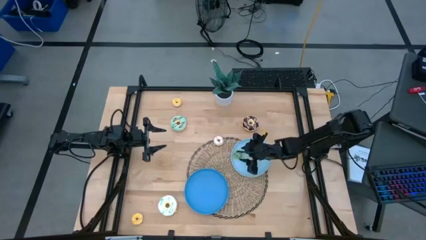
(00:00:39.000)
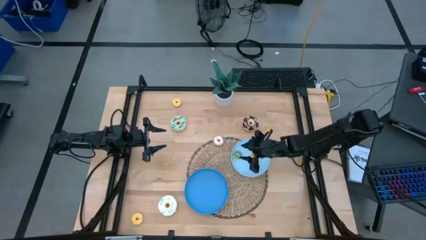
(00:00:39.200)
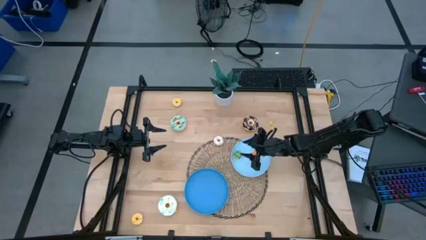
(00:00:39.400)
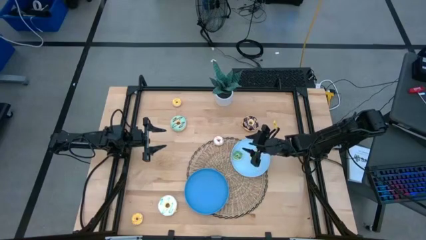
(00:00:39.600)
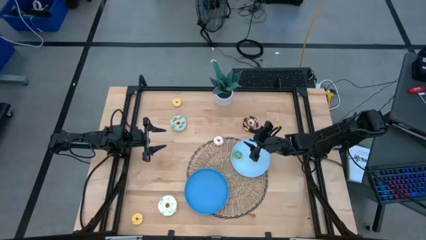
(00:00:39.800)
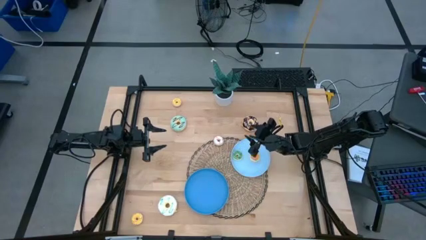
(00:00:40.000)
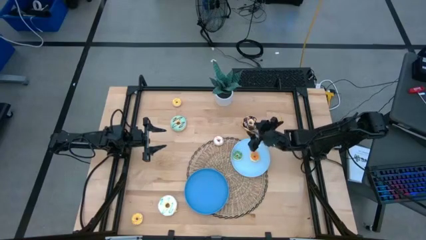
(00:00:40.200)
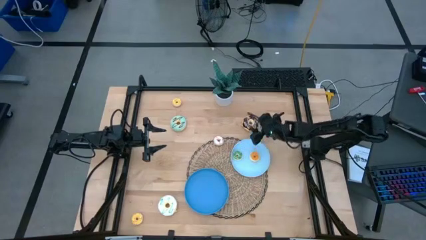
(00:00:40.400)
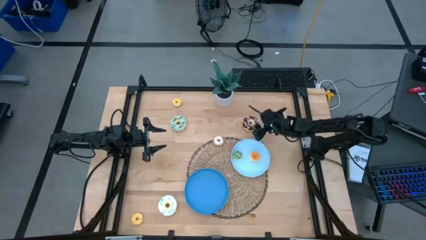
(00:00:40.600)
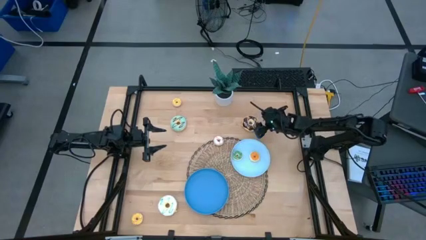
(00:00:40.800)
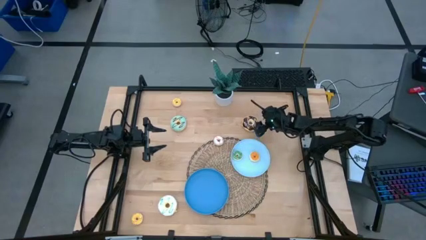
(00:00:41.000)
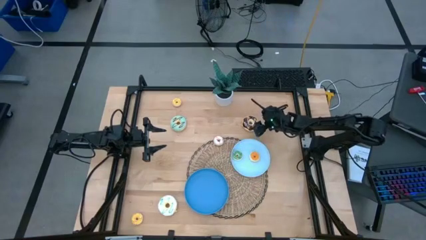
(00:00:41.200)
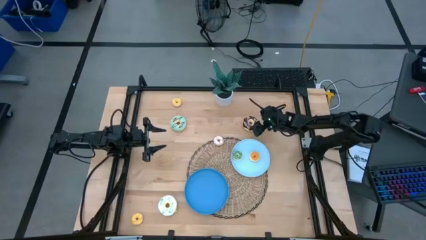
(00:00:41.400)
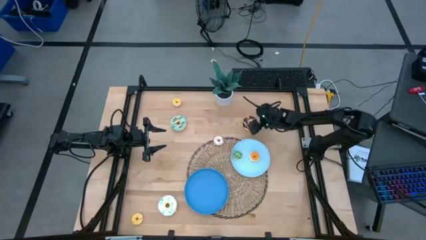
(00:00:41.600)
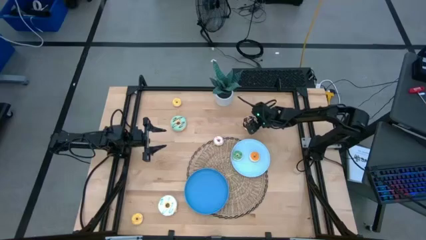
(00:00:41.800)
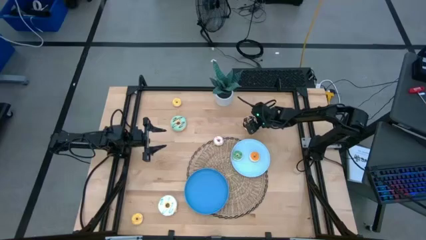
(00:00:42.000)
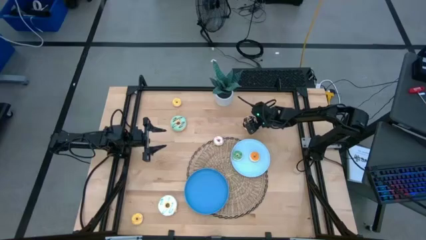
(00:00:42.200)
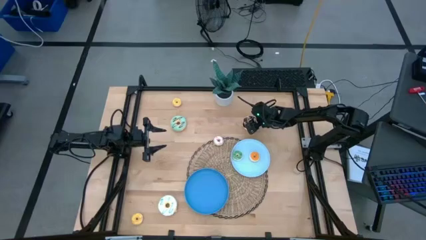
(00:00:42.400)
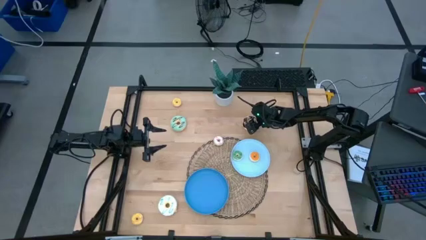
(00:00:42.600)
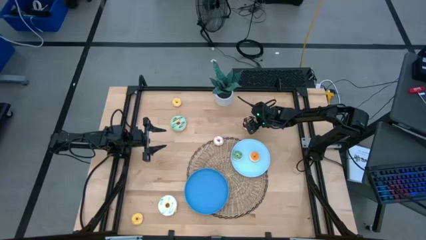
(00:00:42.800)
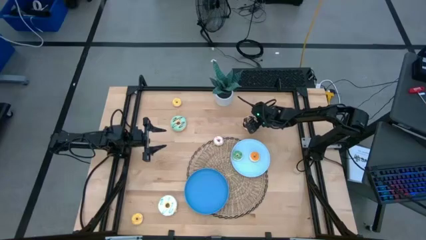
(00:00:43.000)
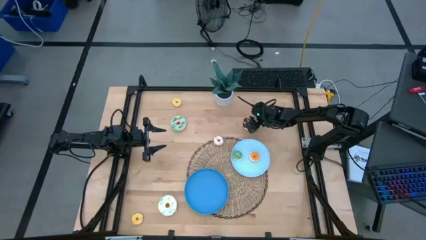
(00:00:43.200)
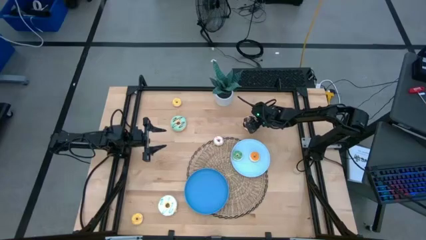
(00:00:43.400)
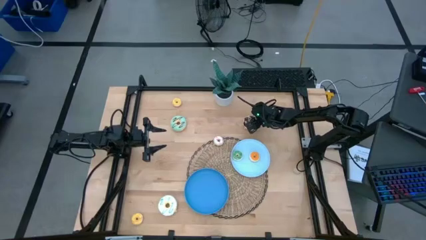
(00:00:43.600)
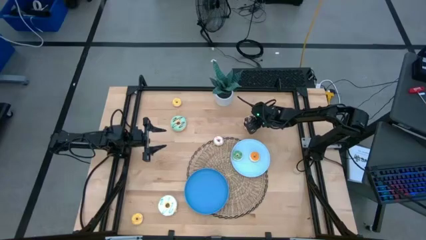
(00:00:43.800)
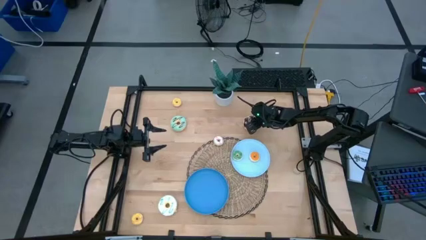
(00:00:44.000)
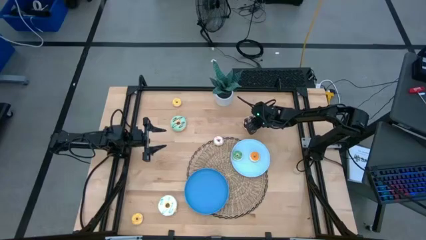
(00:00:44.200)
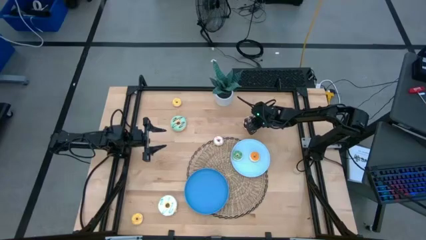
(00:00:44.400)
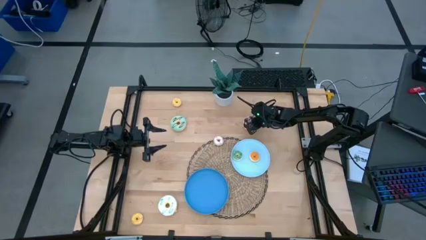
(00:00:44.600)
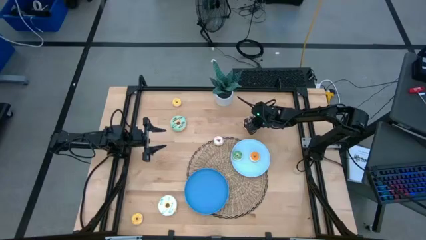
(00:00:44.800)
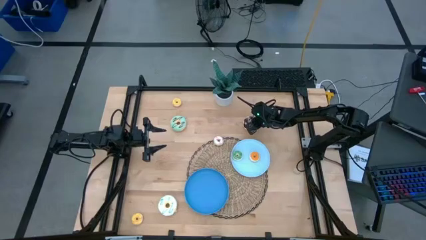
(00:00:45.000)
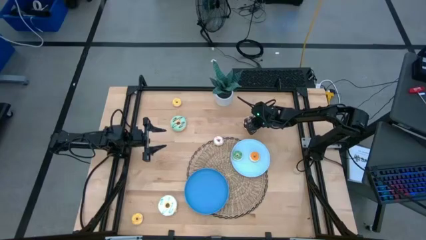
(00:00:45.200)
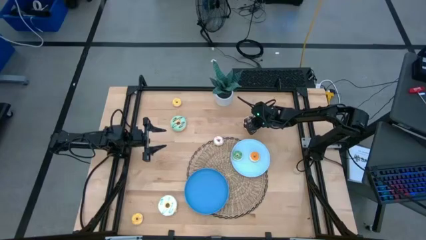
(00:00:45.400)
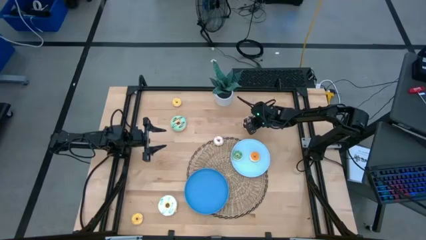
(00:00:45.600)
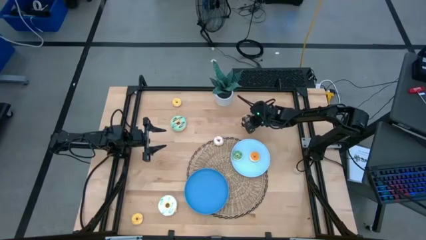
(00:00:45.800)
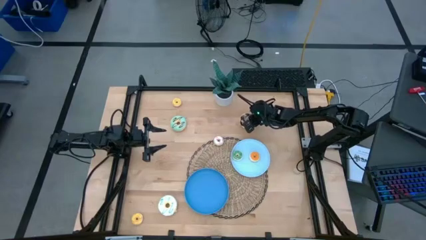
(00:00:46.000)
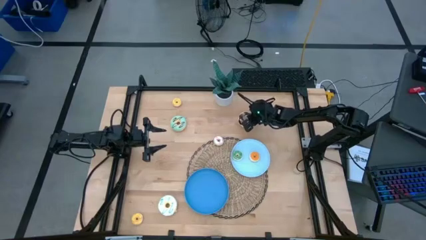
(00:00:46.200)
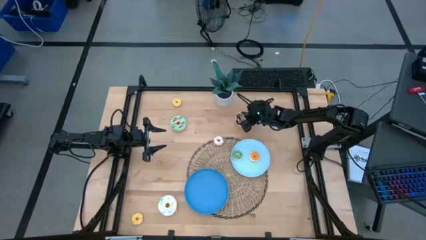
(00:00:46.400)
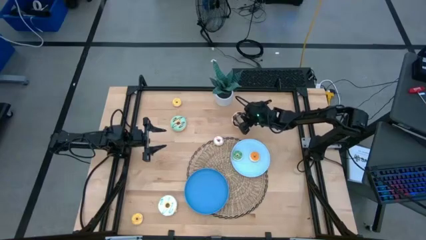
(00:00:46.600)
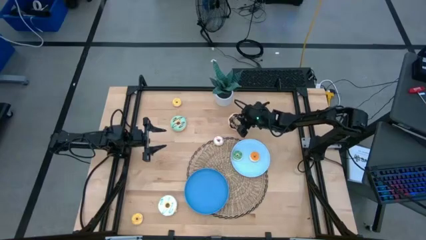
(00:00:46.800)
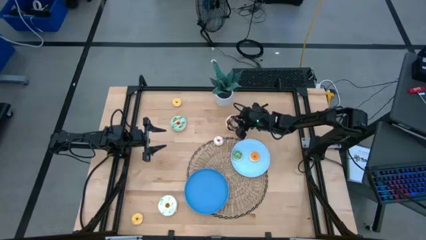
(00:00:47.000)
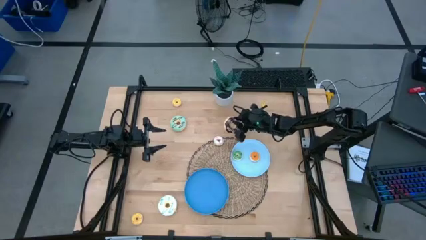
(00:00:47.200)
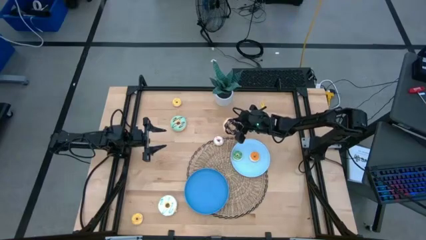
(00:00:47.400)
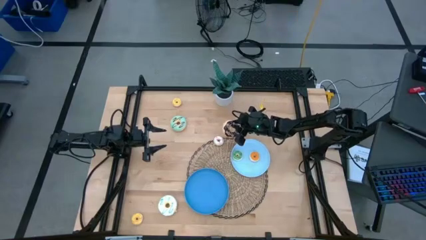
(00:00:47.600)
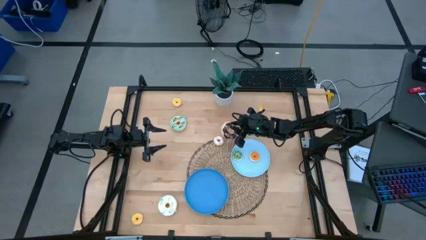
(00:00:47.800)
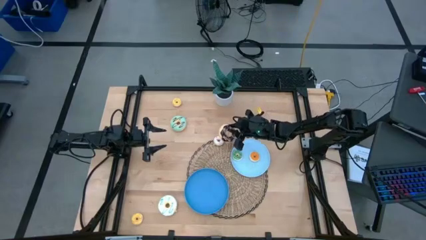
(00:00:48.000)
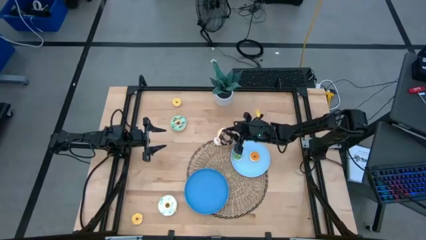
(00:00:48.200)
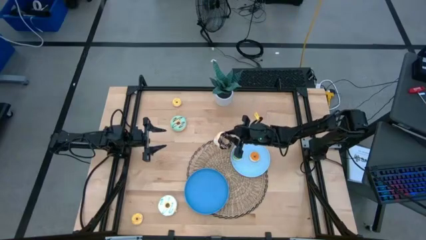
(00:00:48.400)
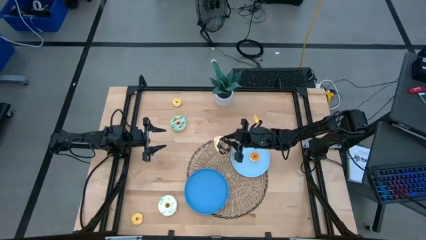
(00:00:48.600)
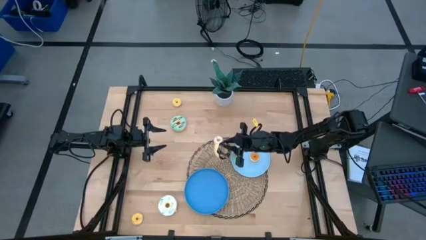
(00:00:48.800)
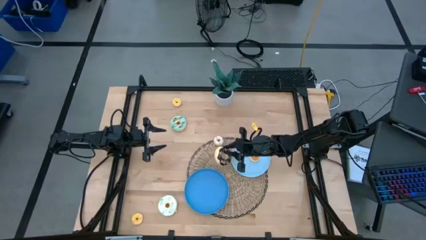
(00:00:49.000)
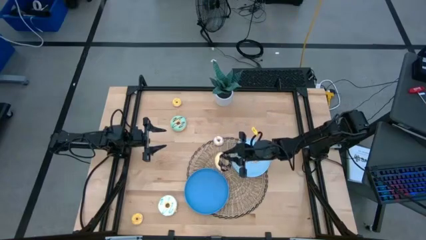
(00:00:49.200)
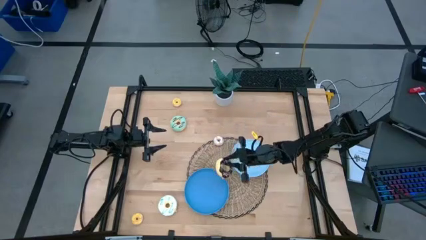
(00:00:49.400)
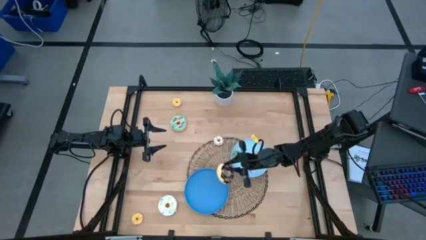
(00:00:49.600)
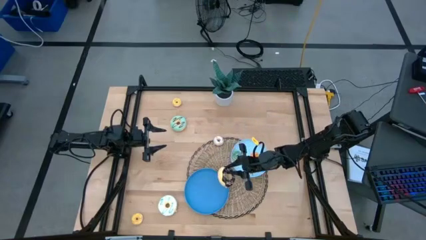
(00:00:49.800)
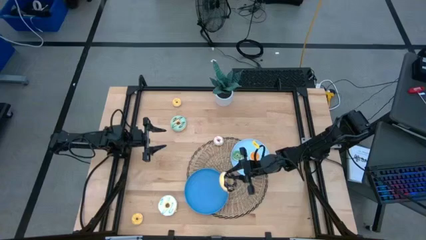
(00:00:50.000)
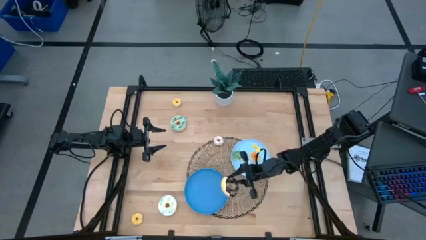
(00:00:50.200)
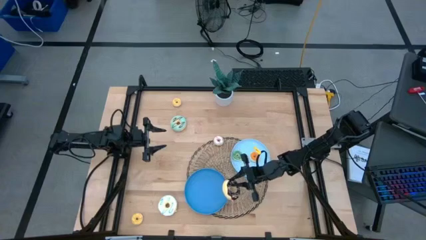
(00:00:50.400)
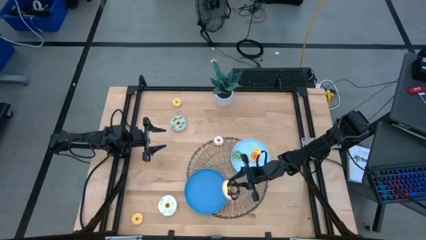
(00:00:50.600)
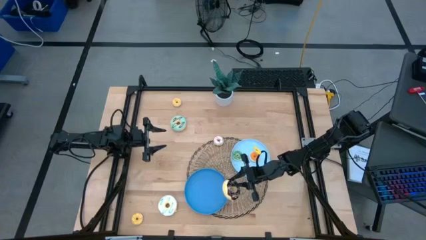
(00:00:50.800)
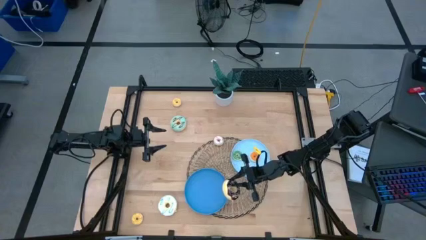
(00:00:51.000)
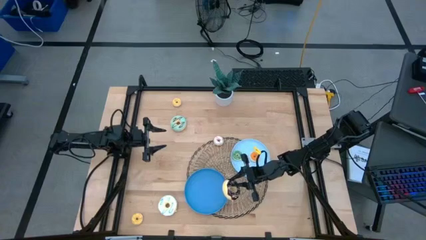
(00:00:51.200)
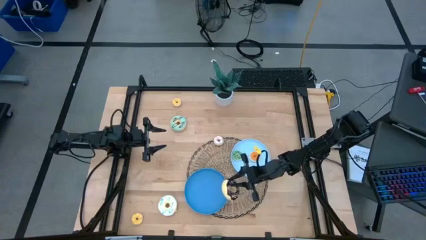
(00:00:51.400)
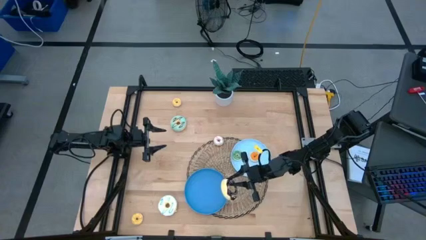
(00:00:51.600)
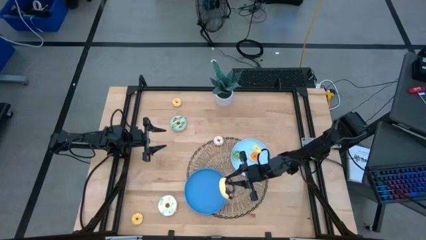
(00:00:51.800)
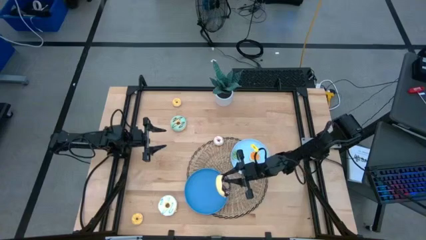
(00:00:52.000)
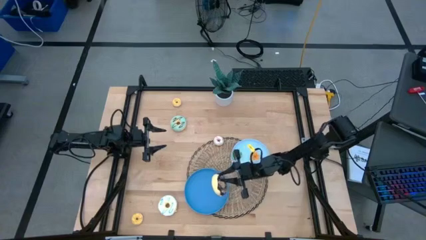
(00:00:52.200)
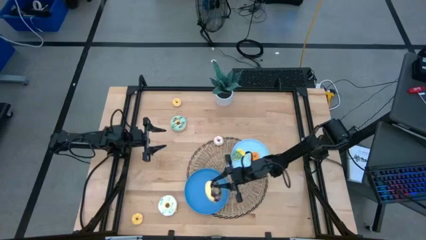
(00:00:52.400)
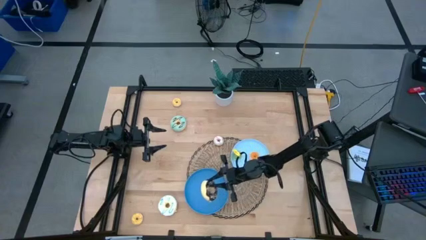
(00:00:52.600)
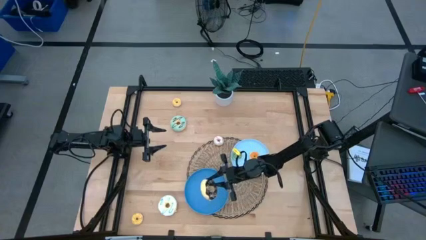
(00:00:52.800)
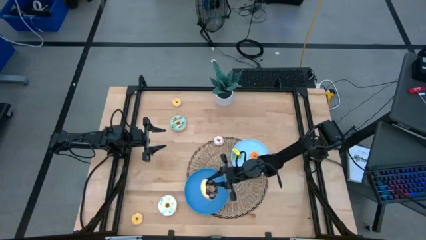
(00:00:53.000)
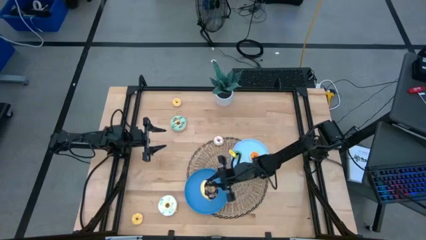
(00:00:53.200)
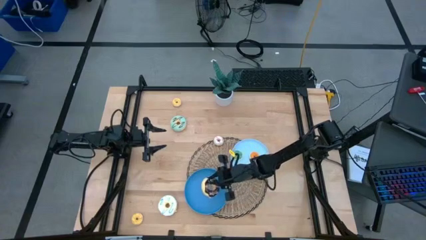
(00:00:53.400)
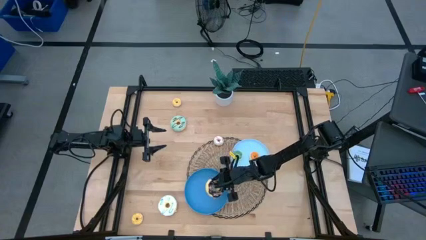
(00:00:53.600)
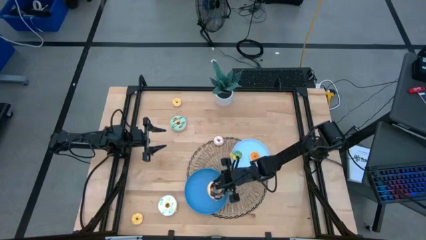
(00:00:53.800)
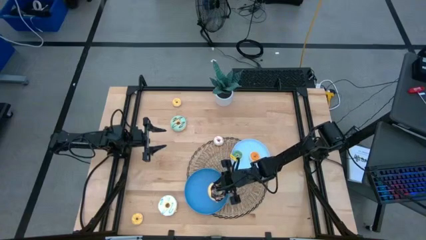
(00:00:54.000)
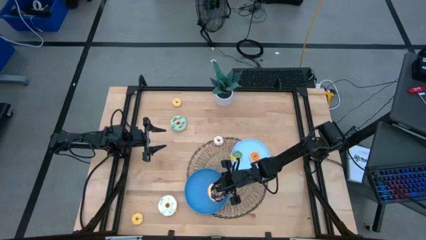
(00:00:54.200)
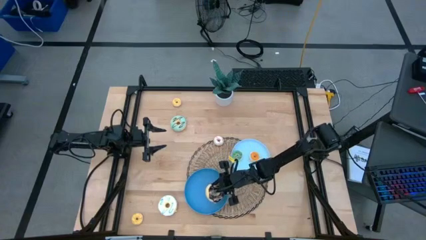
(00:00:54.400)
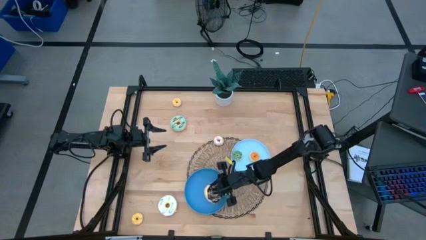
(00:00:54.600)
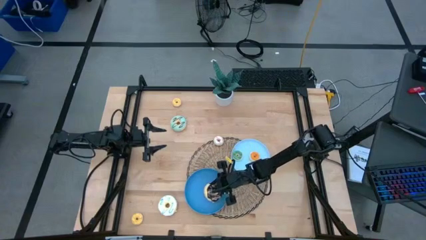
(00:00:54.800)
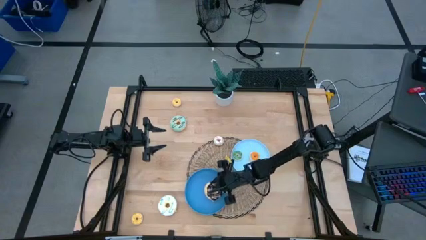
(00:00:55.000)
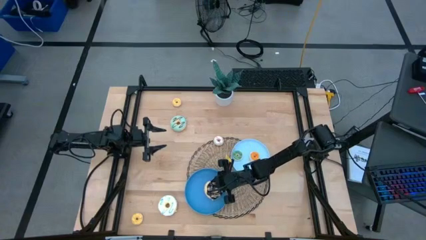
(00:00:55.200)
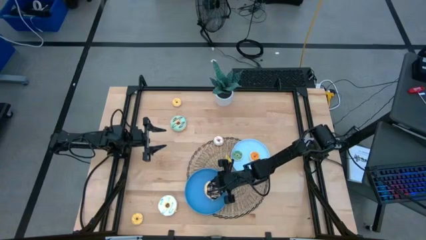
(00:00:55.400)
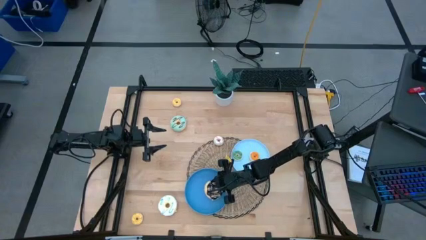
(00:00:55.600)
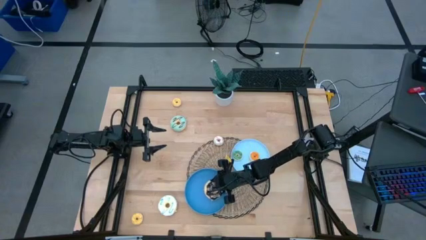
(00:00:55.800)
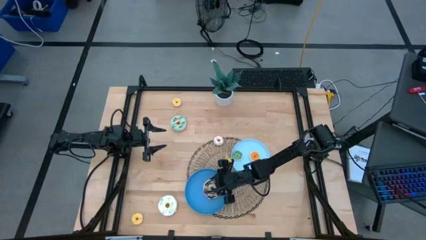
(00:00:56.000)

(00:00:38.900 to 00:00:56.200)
Task: Pick & Place donuts
Put the large black donut on the blue plate
